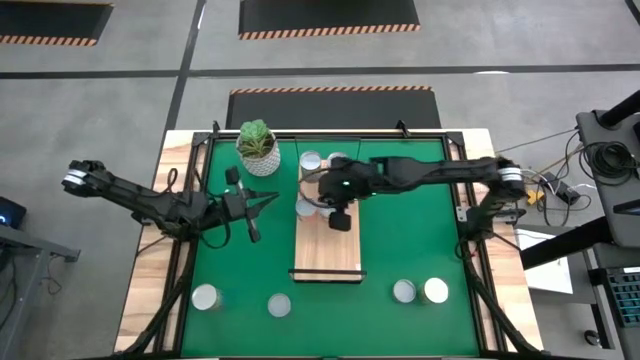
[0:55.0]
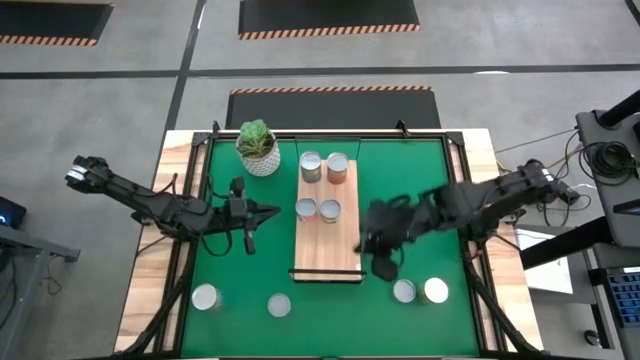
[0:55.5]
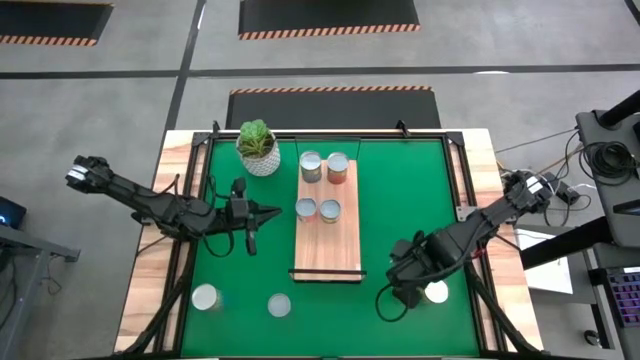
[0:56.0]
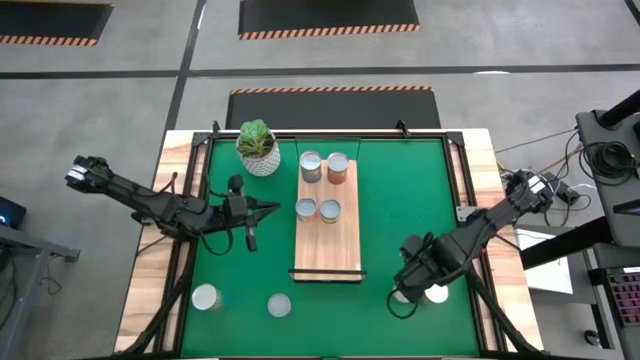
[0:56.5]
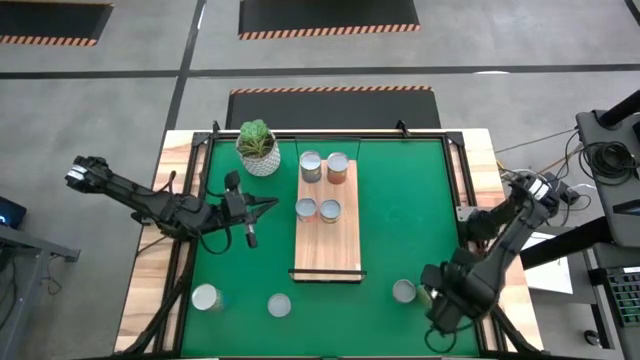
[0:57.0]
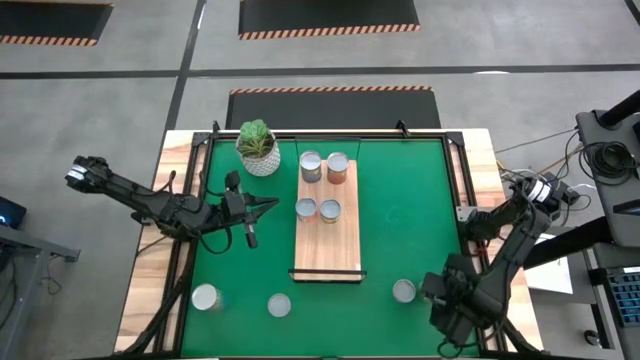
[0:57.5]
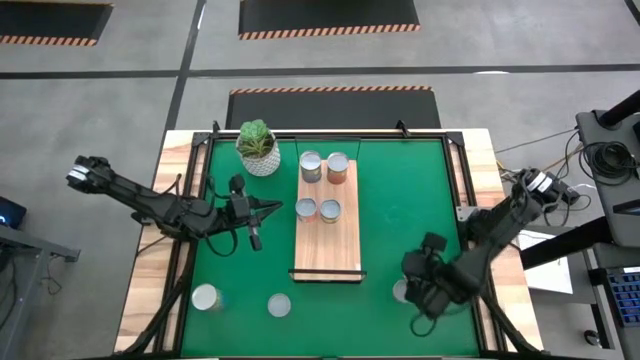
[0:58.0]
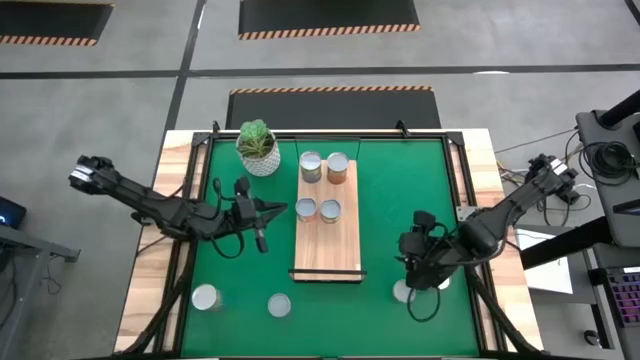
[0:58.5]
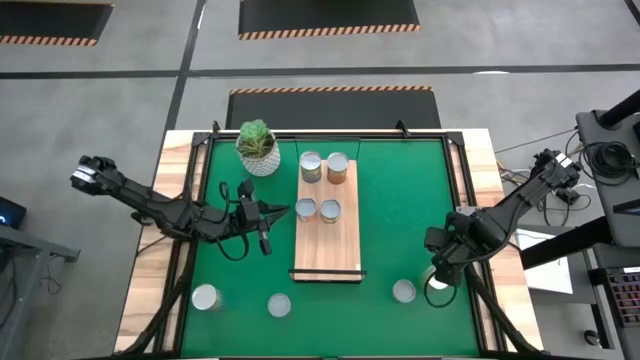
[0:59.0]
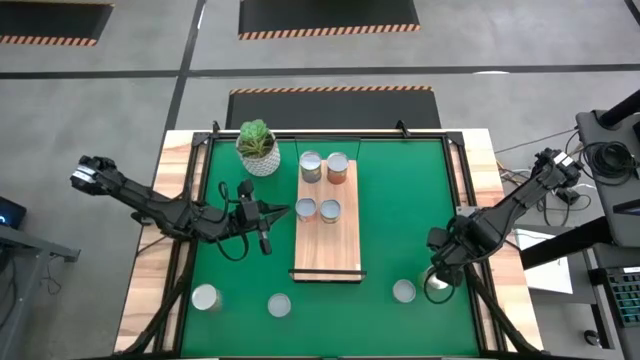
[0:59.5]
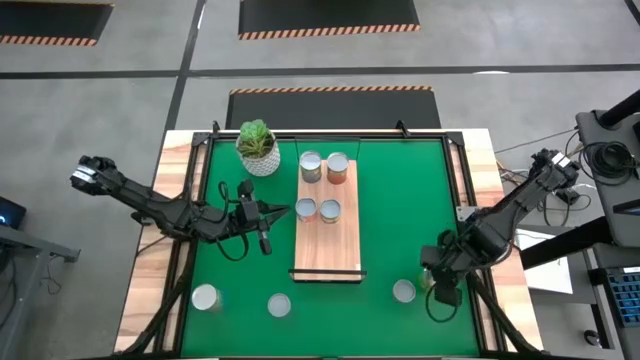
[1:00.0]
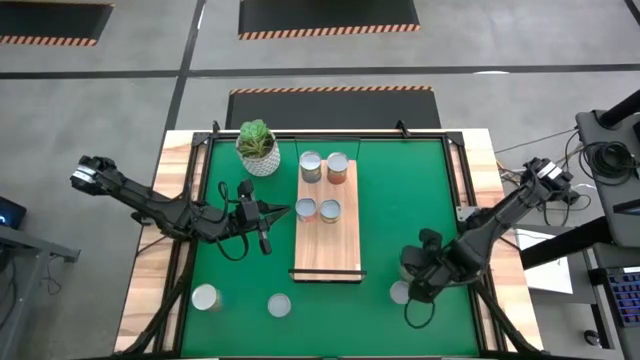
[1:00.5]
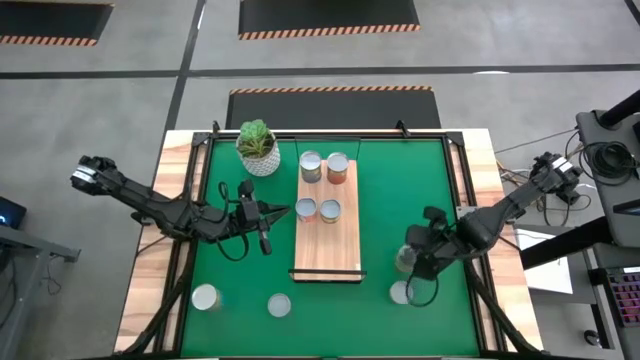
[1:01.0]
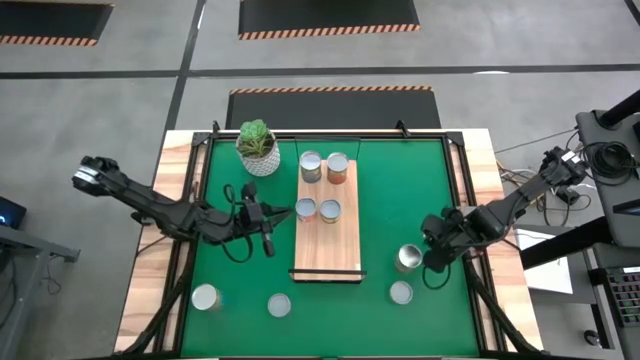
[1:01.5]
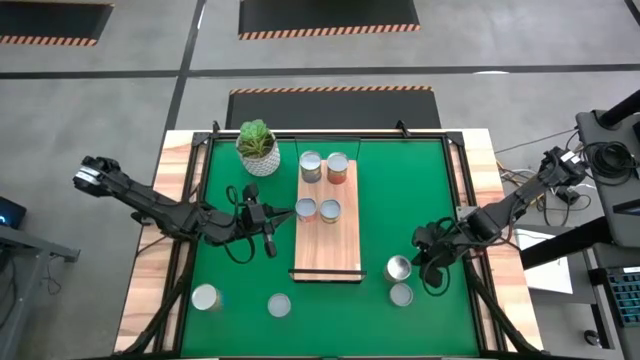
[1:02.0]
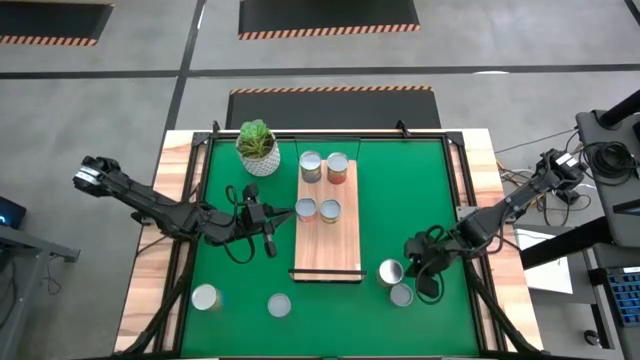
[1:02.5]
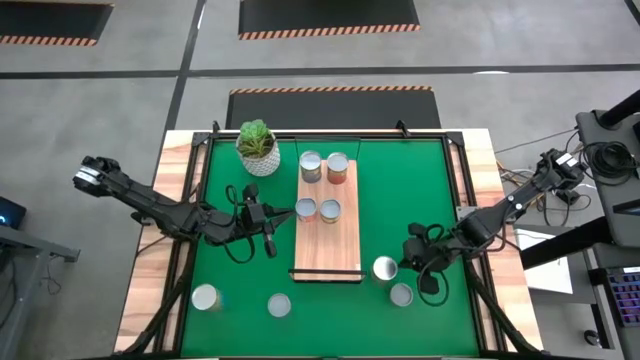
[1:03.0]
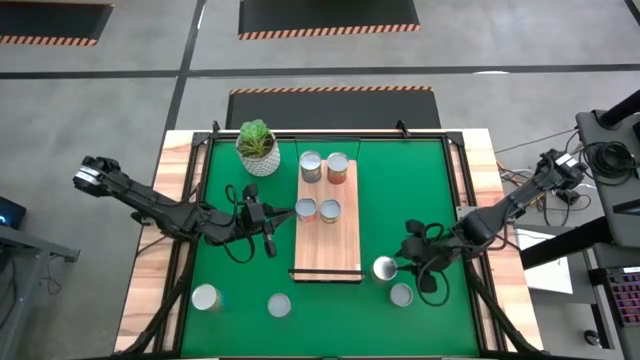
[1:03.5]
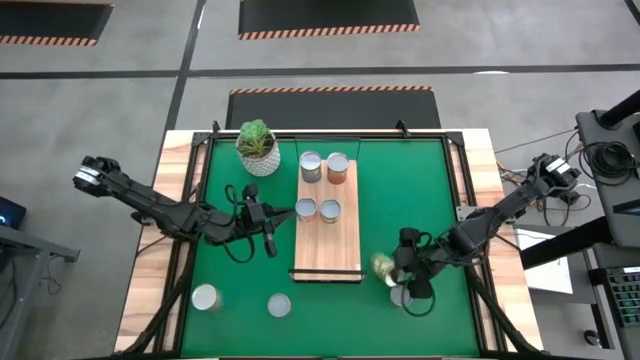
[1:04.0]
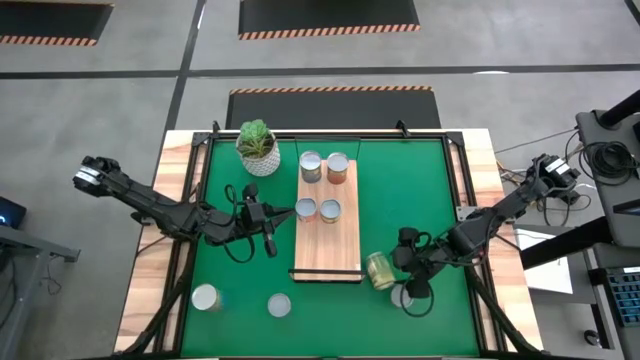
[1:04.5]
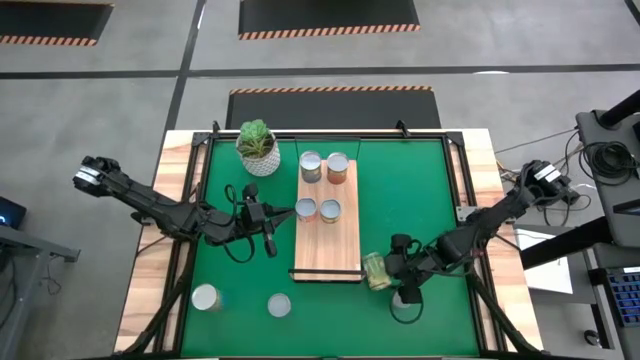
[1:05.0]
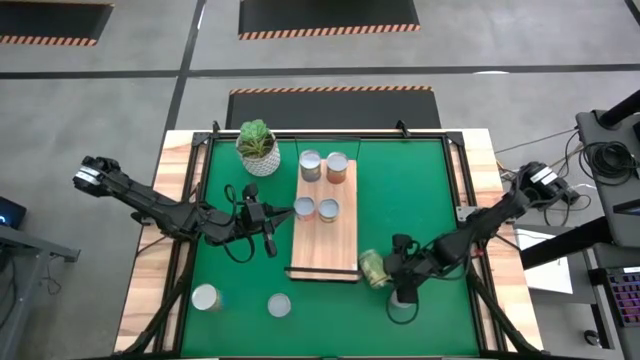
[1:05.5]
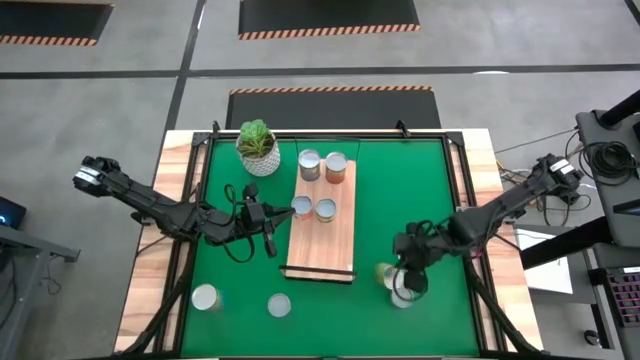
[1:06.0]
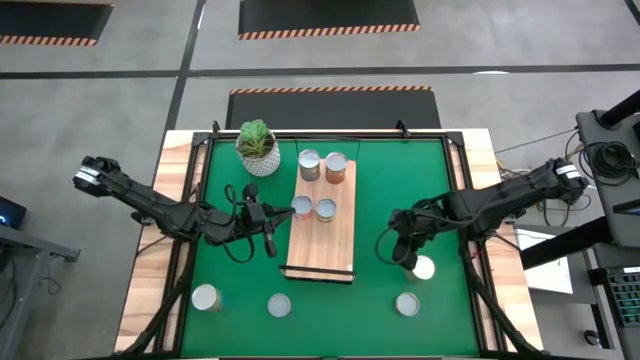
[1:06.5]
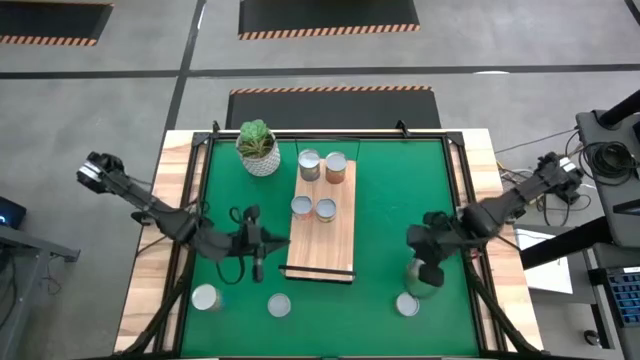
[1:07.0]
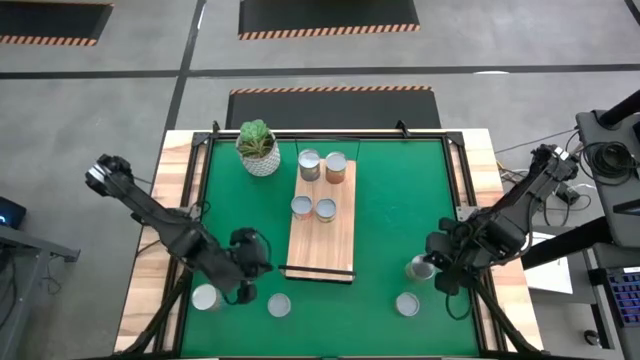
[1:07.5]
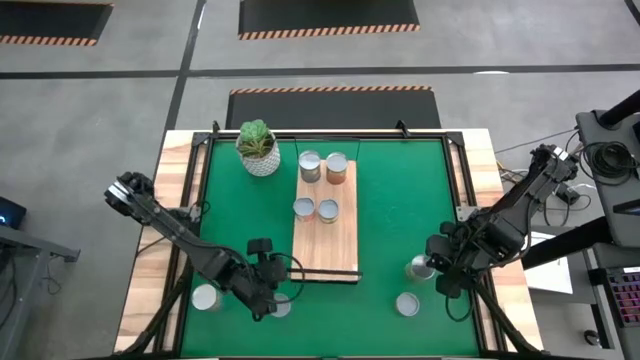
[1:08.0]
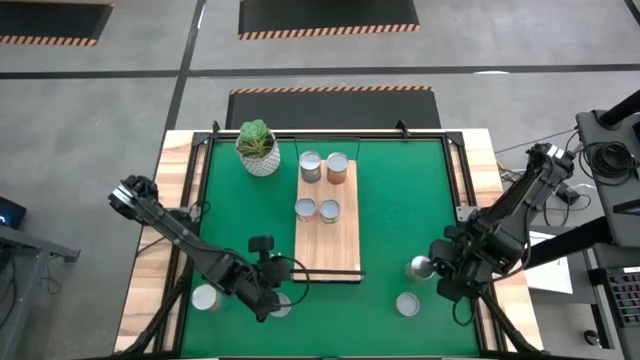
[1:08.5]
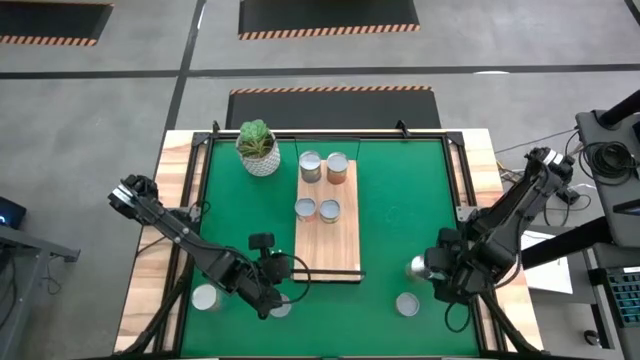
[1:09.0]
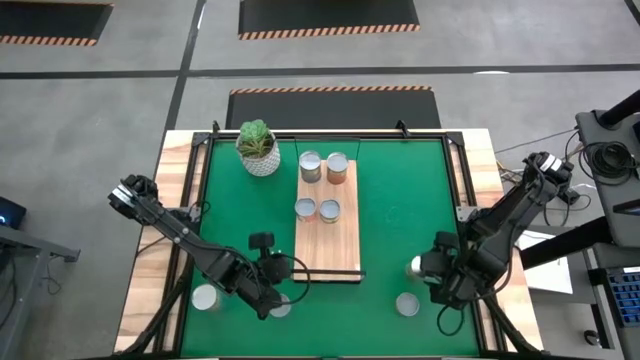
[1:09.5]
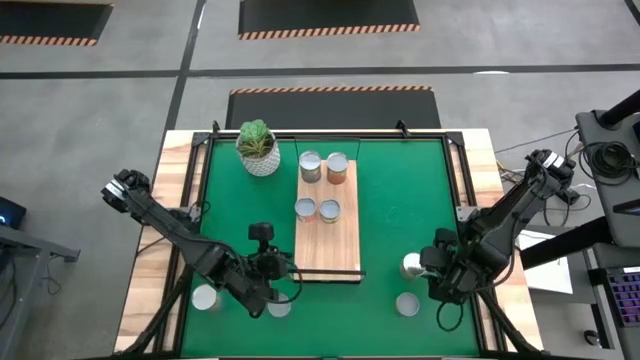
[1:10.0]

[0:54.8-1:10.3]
Task: Pick and place cans onto a shelf
Put the canned pears on the shelf

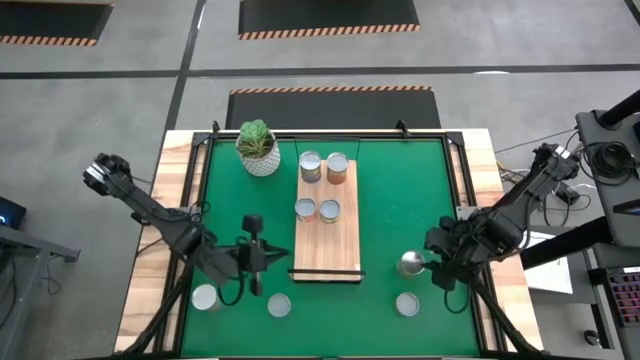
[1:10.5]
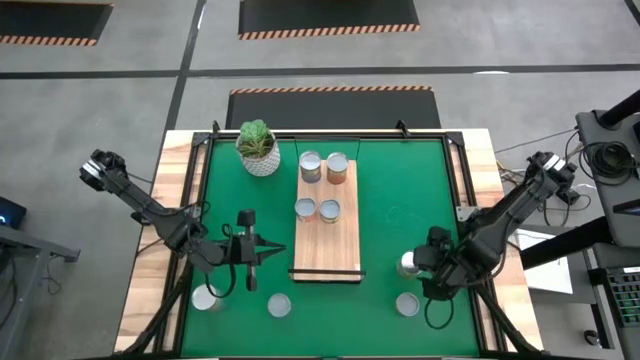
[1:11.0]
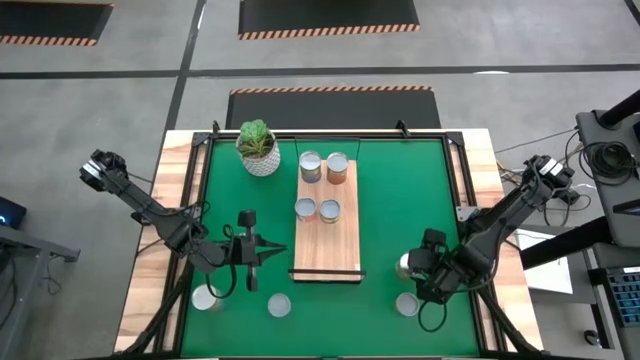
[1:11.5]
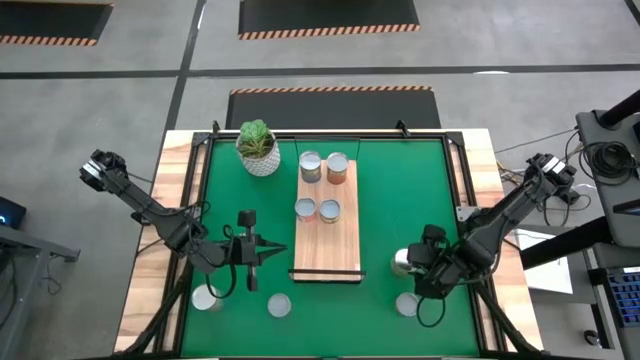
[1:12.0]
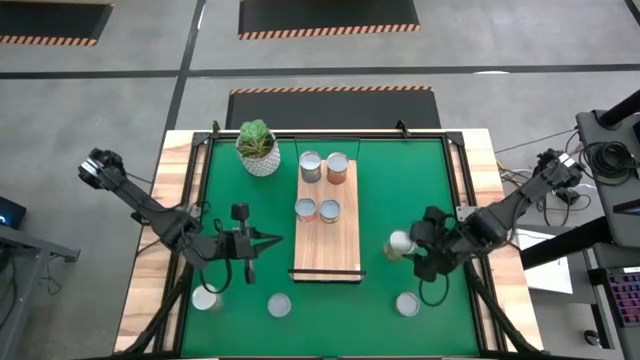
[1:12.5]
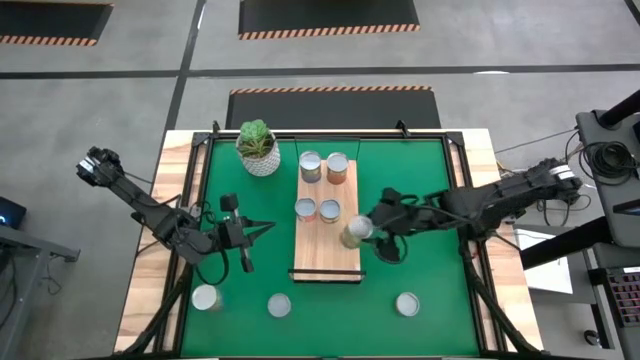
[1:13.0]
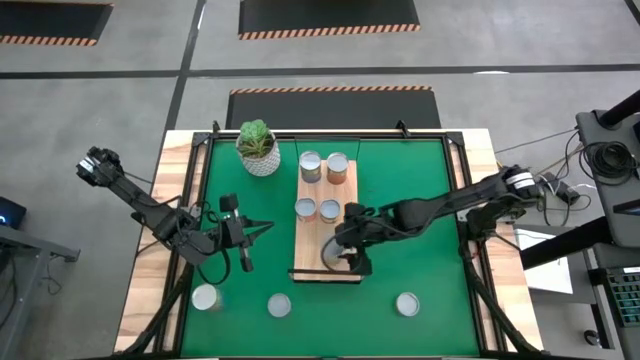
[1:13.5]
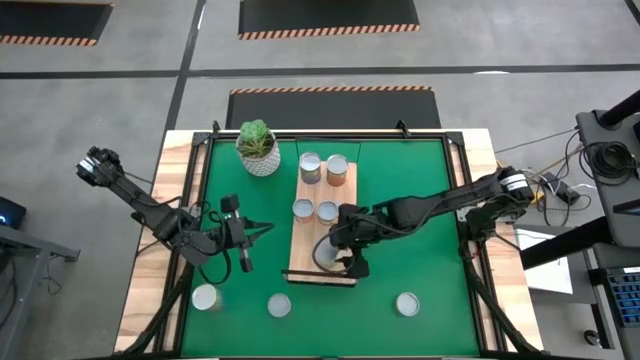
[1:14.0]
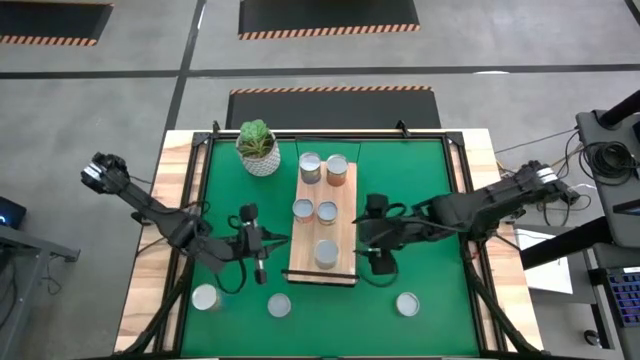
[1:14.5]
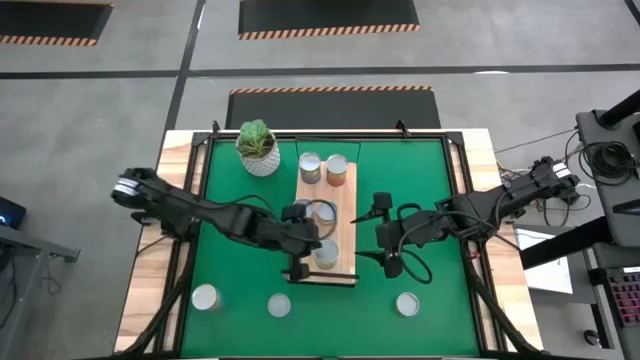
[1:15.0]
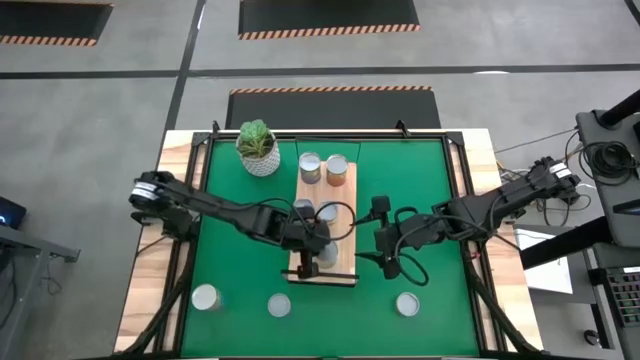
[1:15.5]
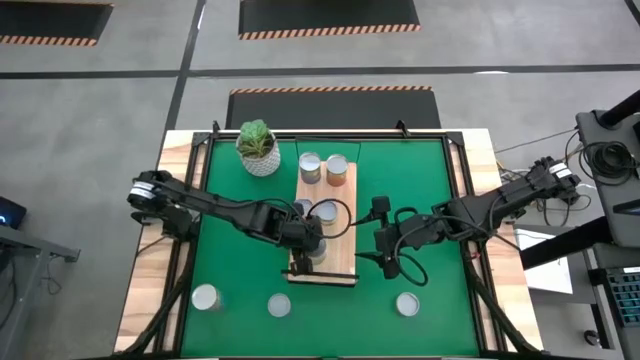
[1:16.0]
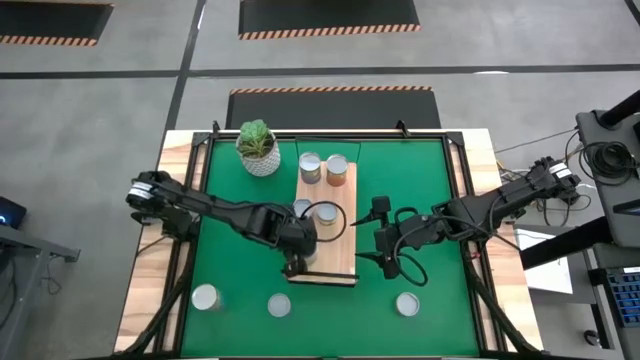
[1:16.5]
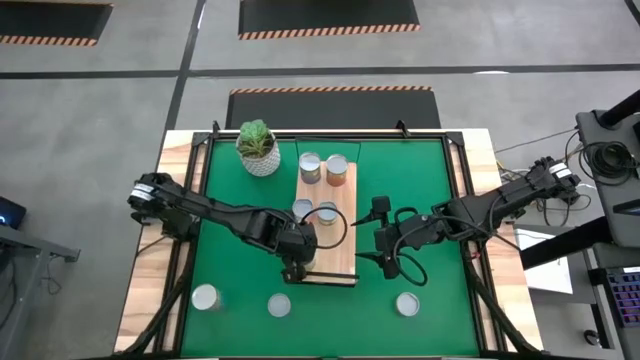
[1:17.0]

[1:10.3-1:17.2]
Put the canned pears on the shelf
